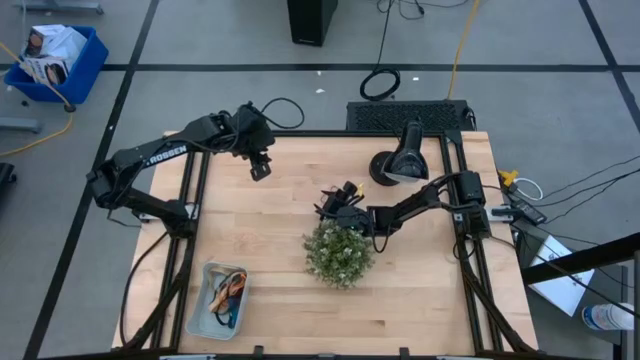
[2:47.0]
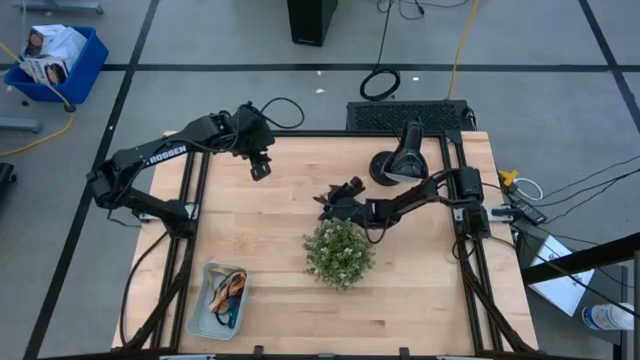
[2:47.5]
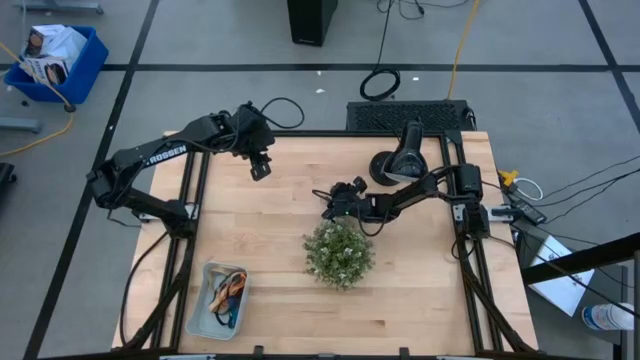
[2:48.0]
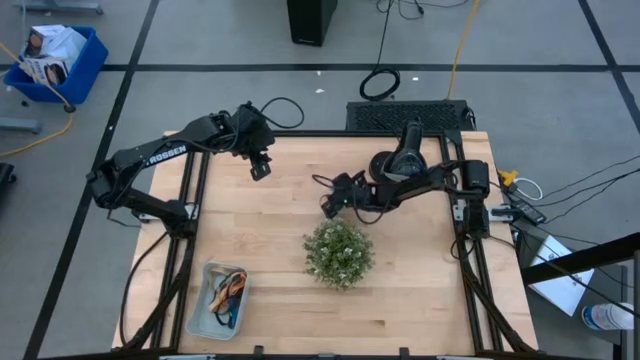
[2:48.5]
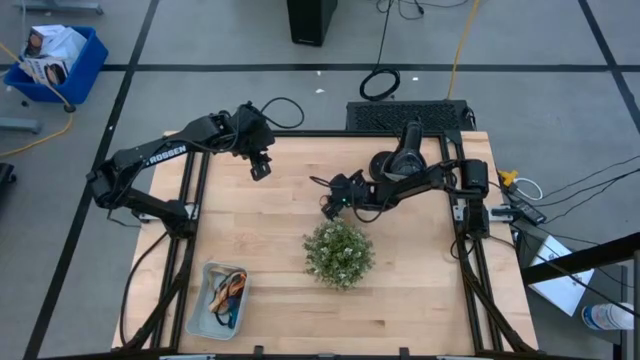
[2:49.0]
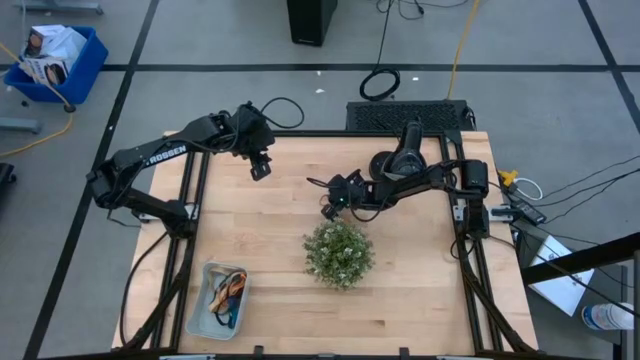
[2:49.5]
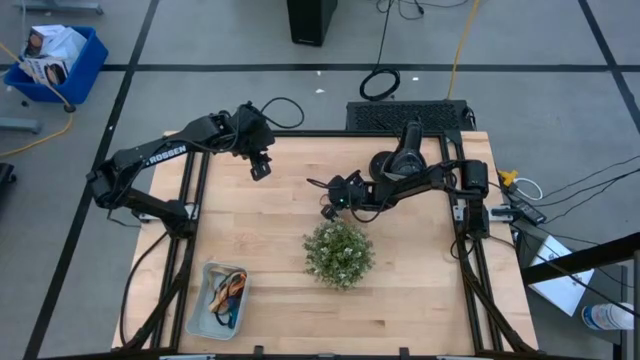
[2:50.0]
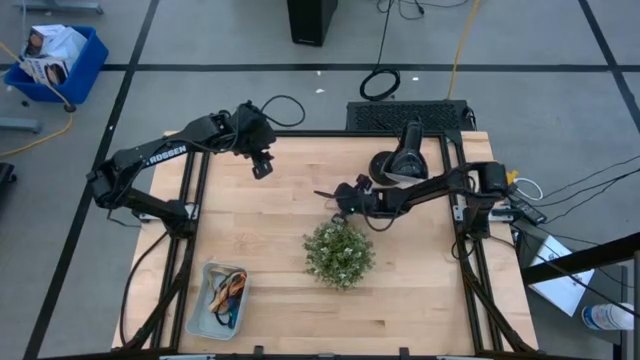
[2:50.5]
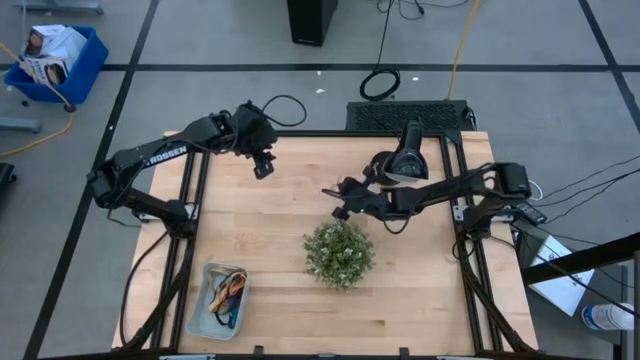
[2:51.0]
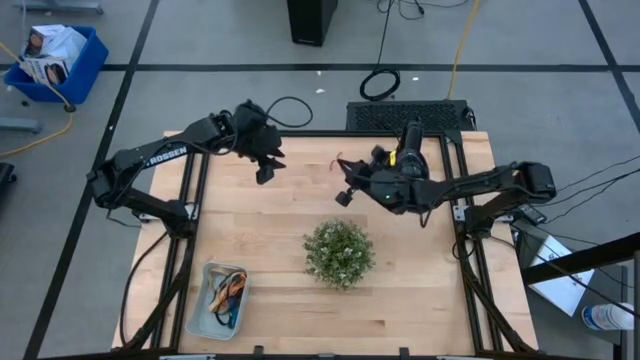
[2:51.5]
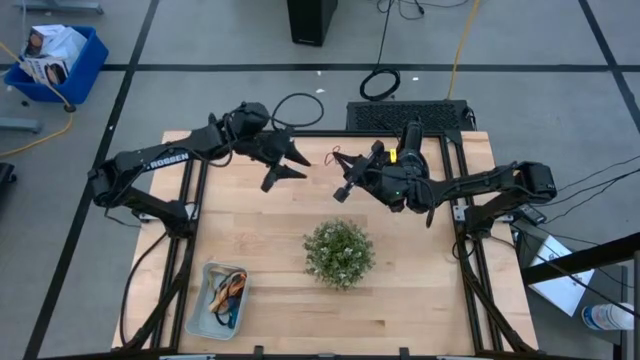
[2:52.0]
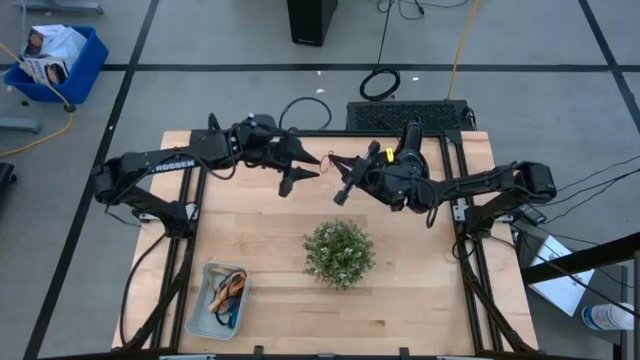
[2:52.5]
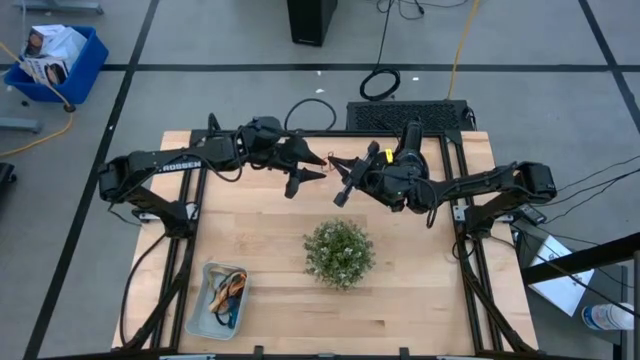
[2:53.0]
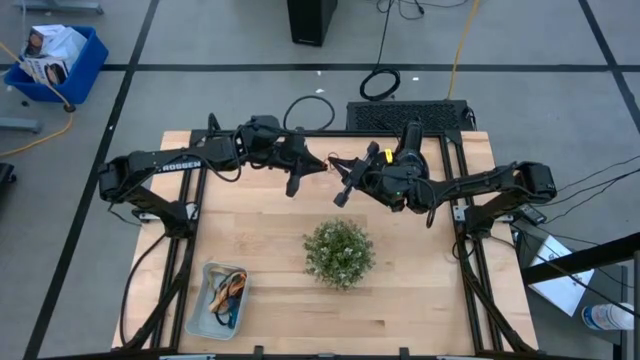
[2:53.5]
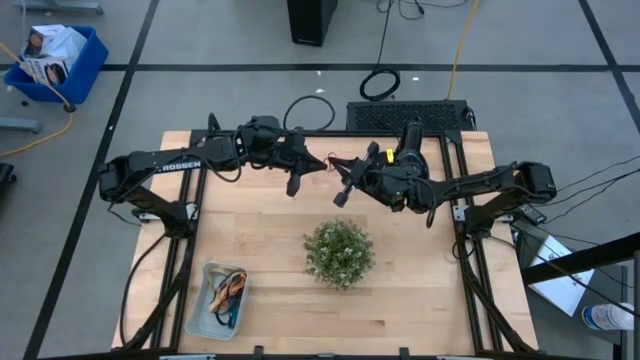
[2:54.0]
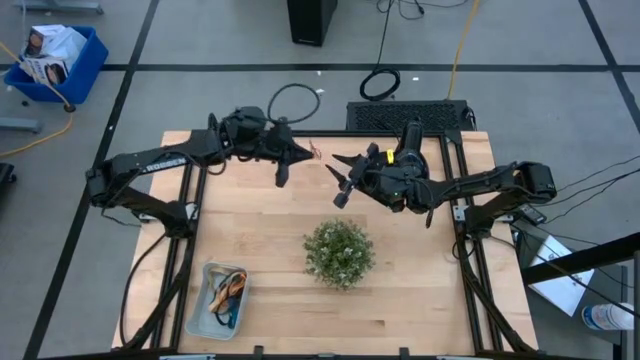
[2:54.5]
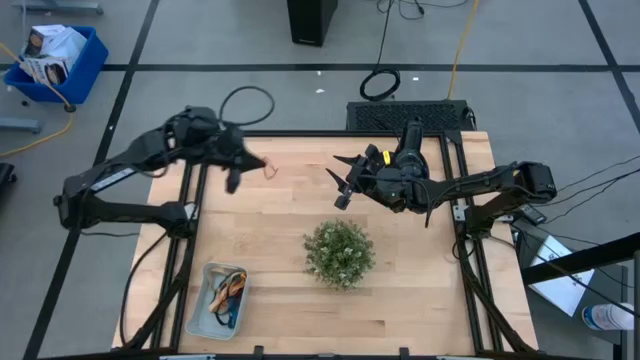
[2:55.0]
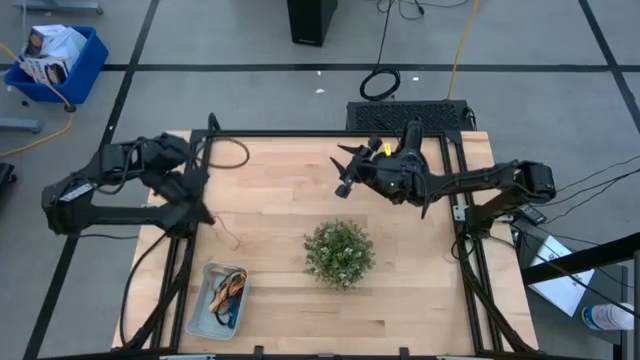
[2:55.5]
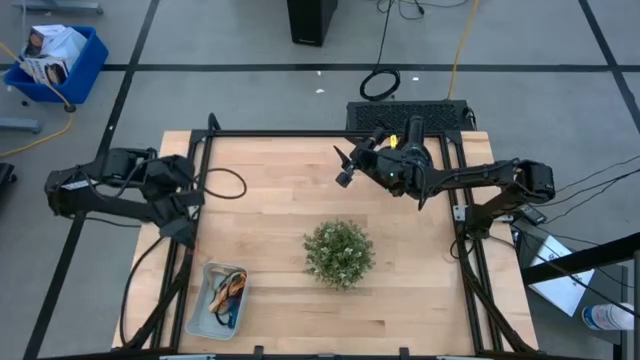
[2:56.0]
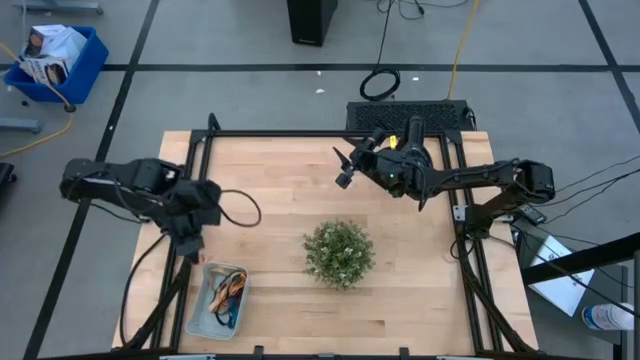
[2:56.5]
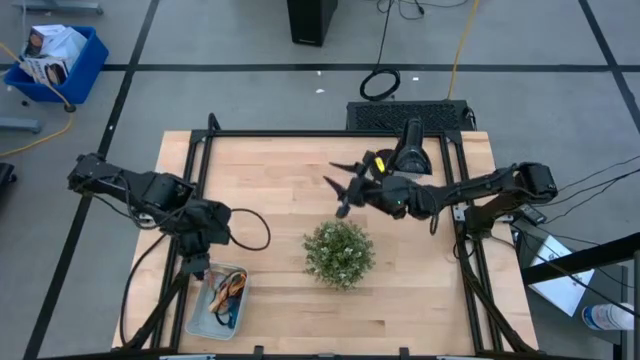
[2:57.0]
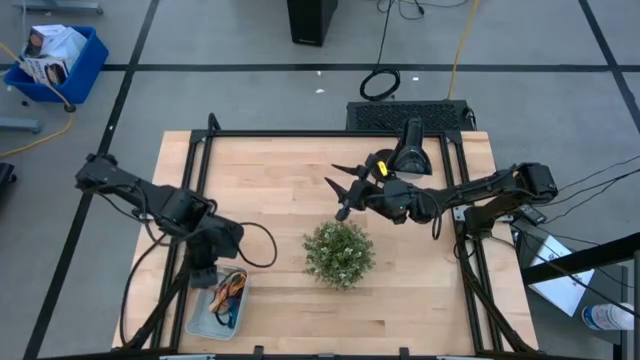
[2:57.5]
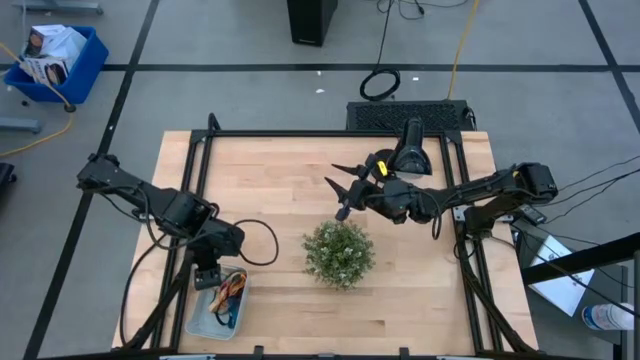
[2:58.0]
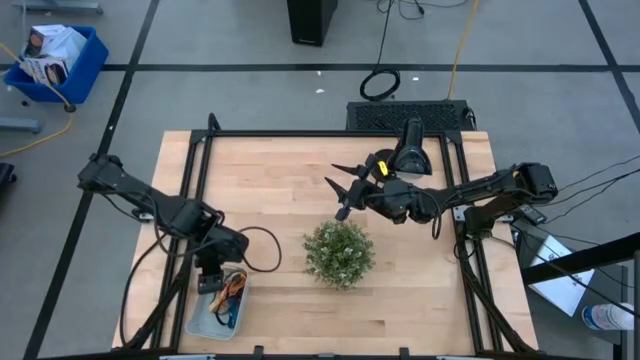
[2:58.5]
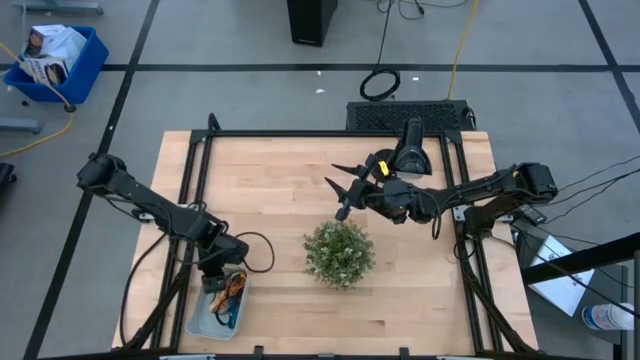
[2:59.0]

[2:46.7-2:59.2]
Task: Pick and place rubber bands into bin
Put the red rubber band into the blue bin

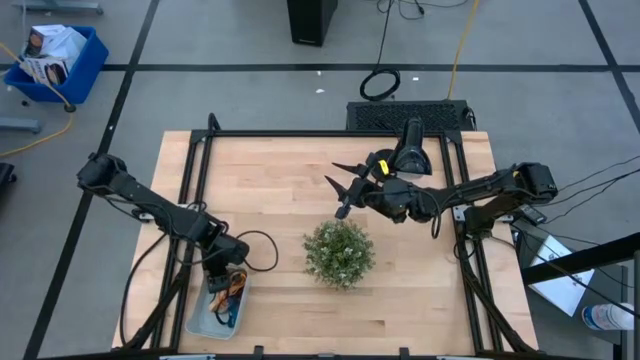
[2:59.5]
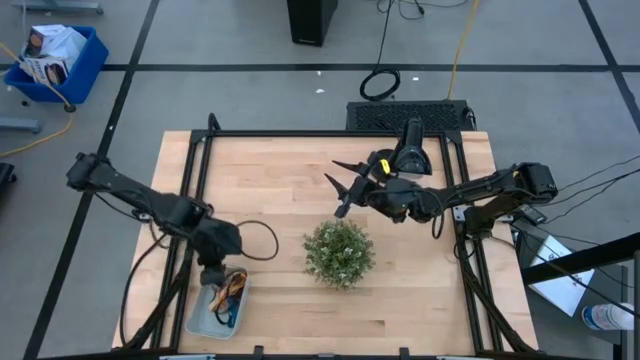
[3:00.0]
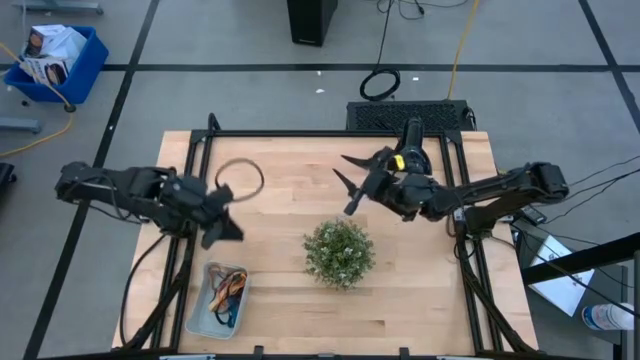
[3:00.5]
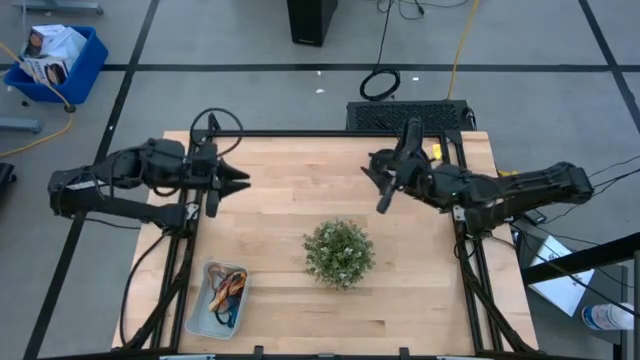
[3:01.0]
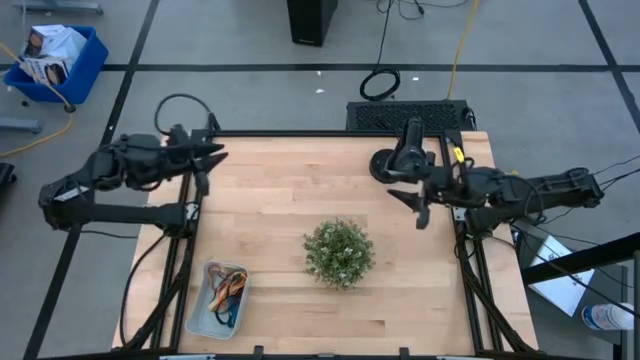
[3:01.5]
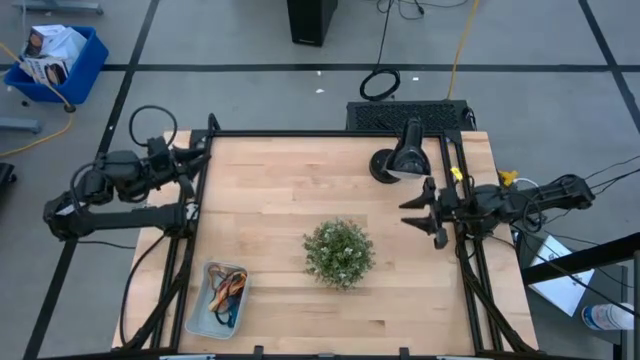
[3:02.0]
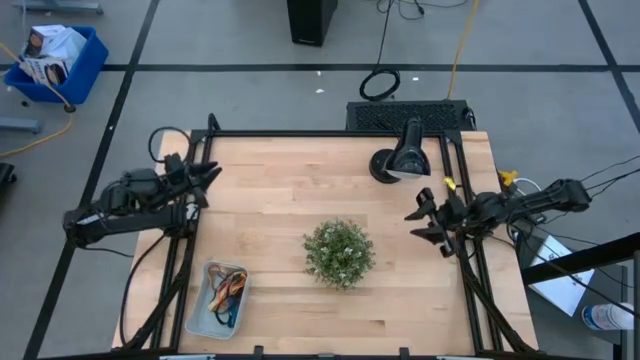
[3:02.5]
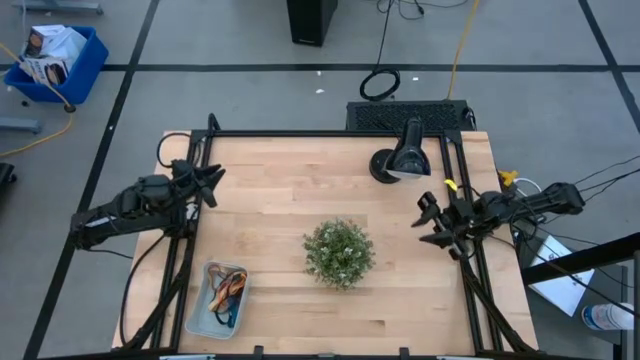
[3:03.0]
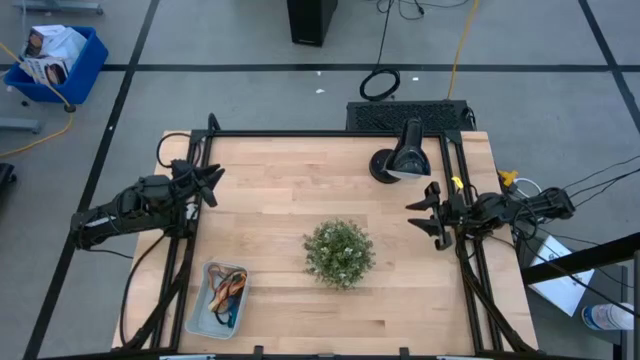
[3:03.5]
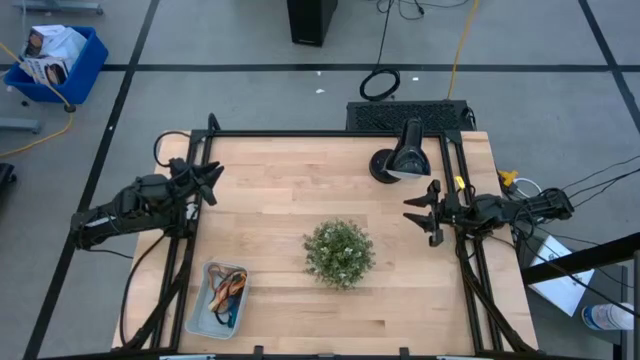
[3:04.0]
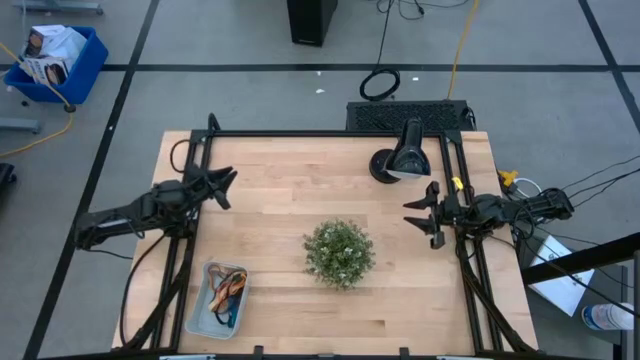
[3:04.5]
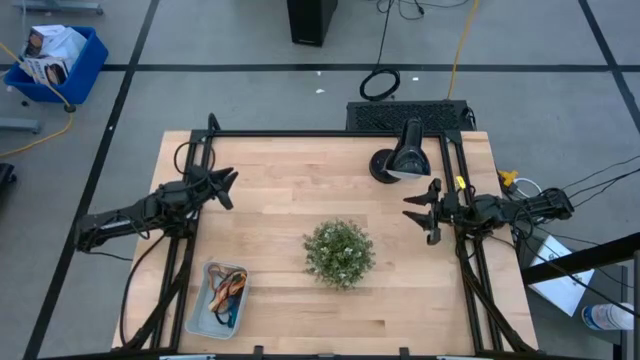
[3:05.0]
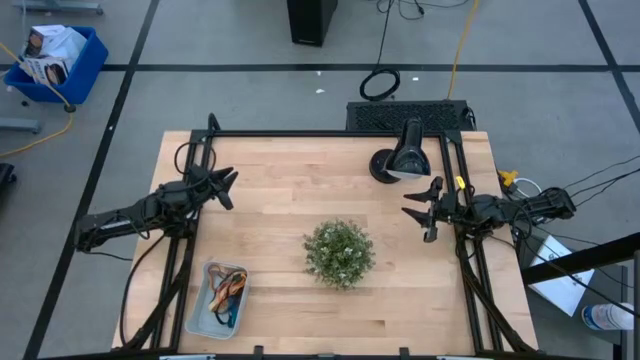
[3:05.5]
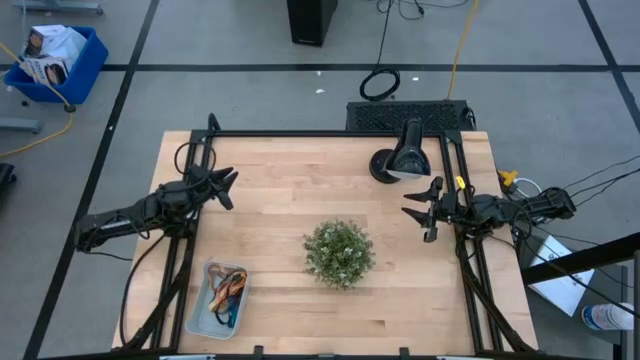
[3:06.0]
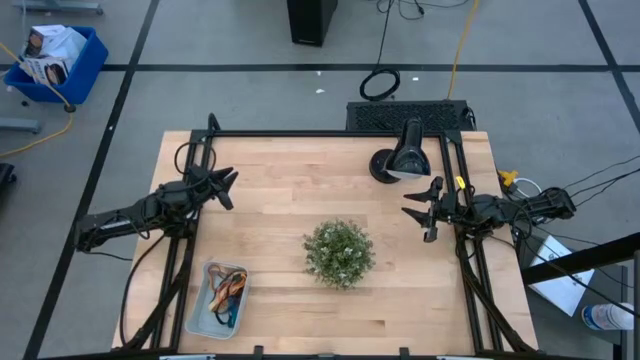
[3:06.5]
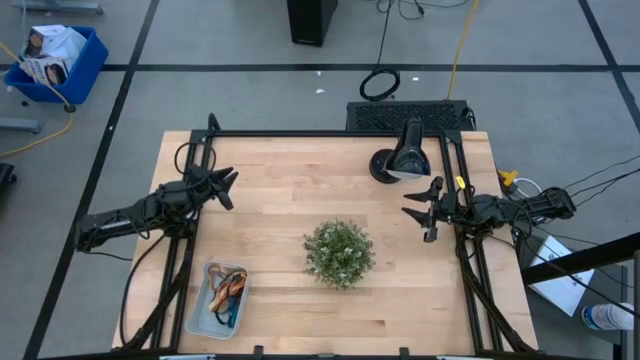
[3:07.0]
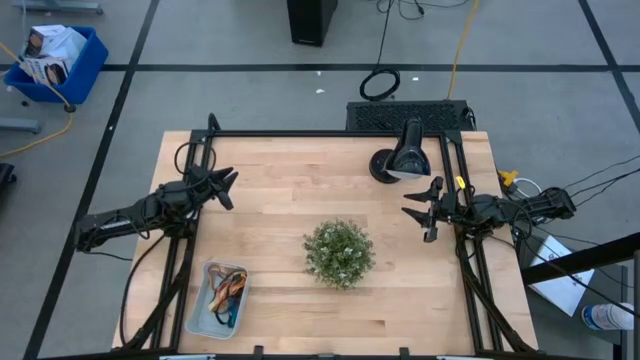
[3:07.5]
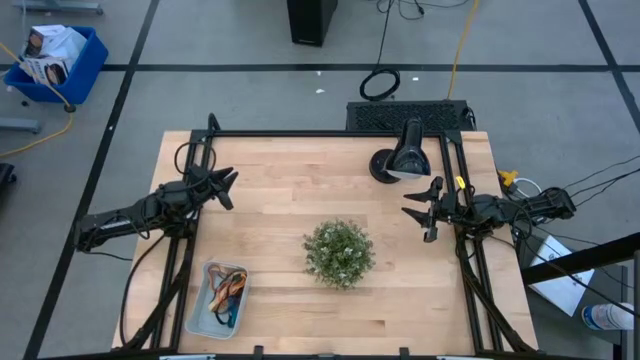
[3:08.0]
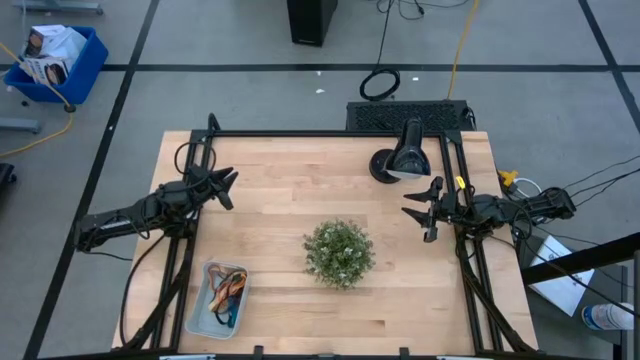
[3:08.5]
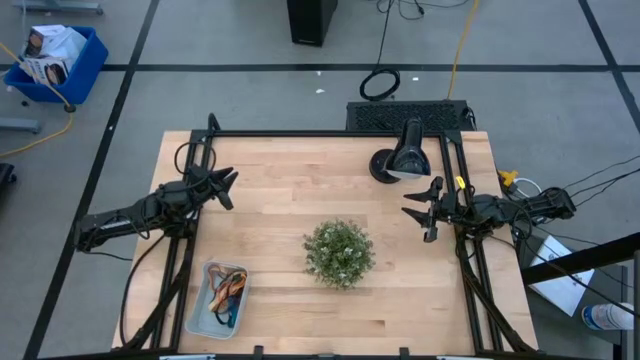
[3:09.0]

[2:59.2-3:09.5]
Return to Home Position
